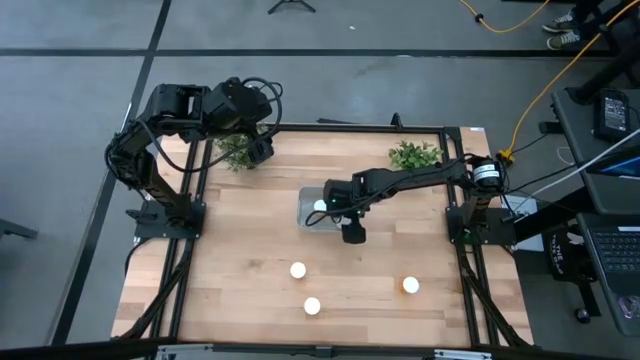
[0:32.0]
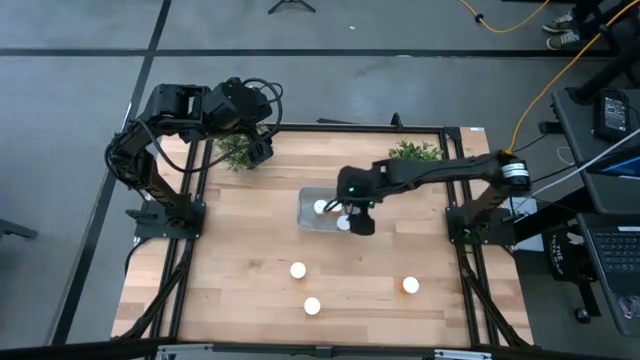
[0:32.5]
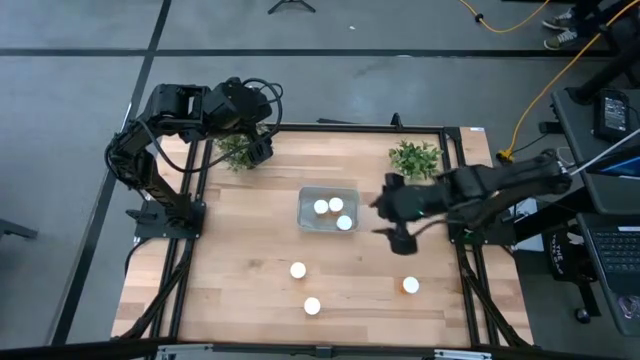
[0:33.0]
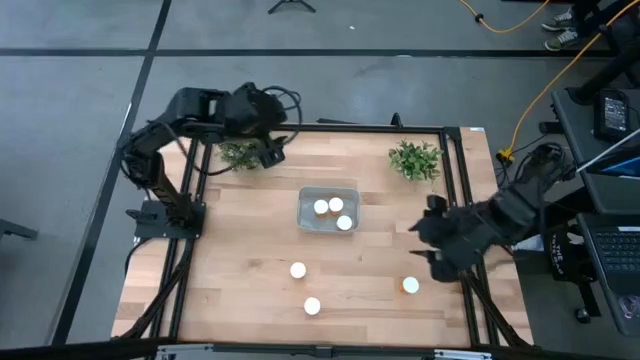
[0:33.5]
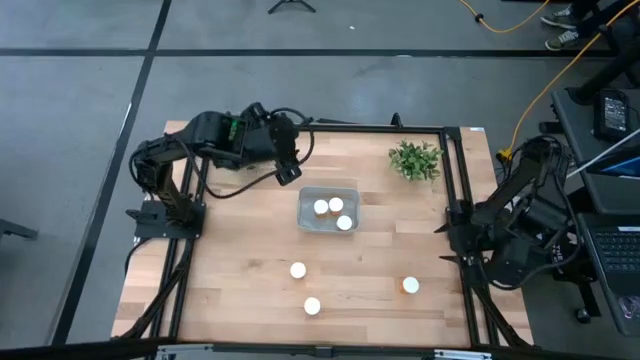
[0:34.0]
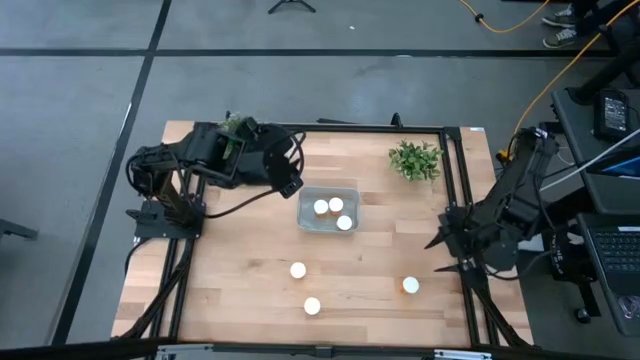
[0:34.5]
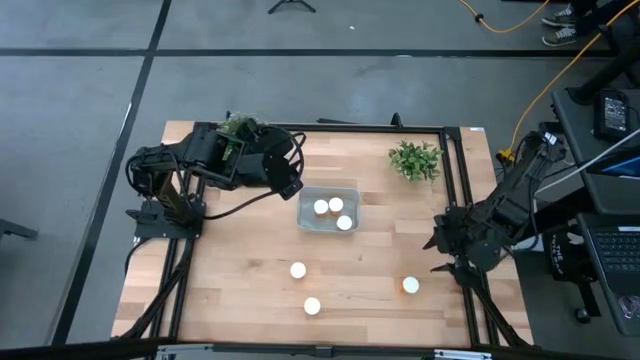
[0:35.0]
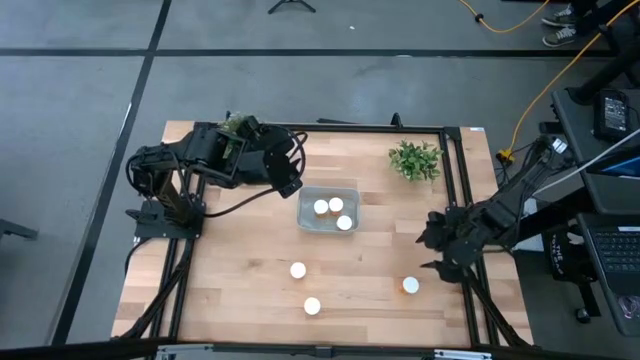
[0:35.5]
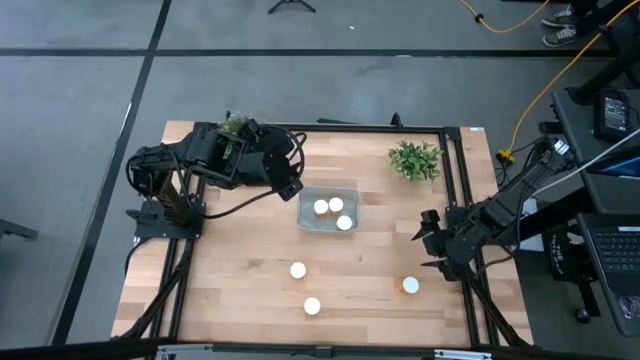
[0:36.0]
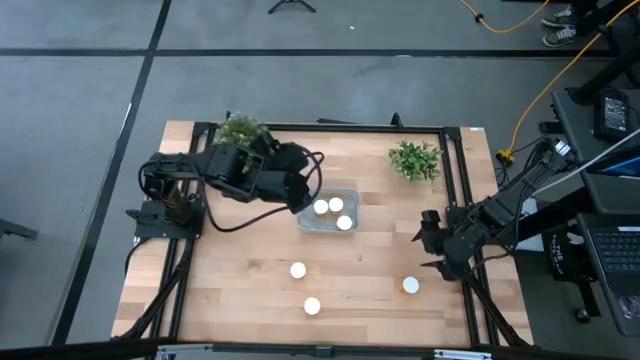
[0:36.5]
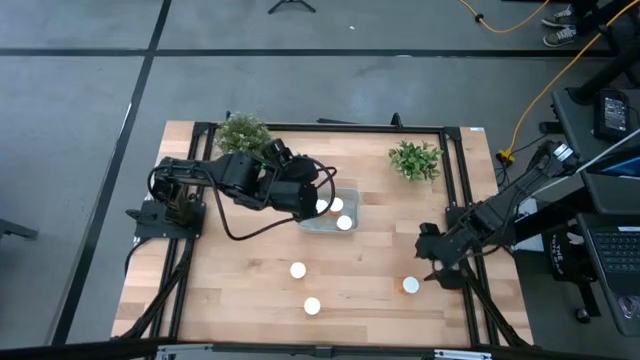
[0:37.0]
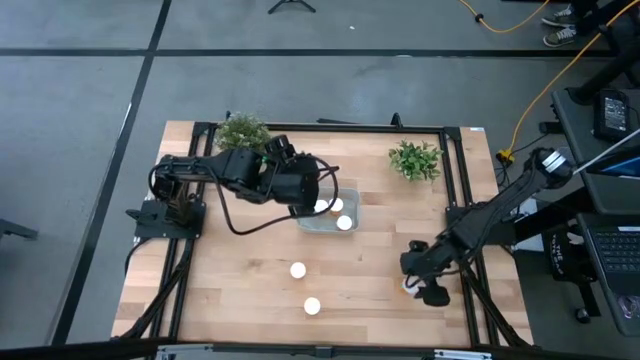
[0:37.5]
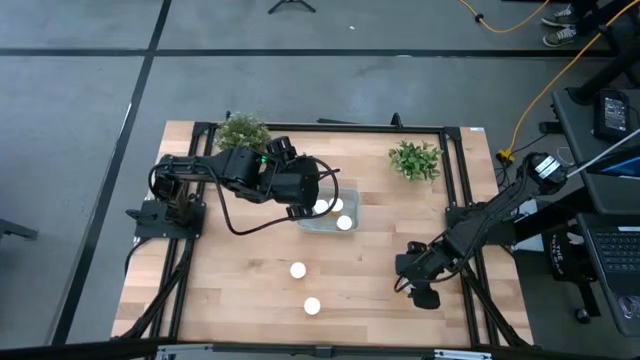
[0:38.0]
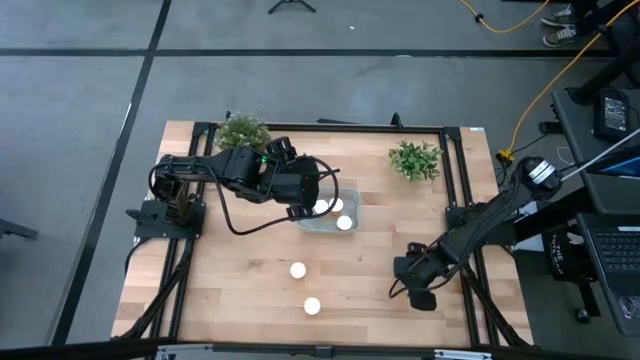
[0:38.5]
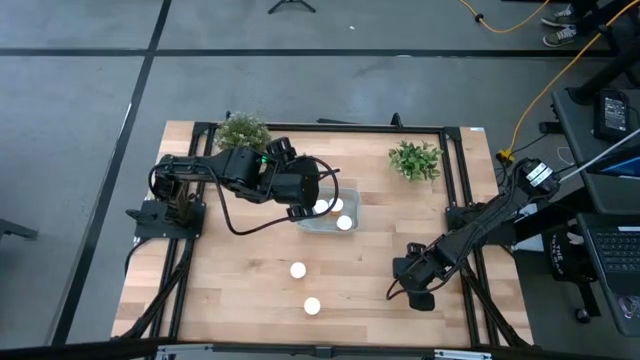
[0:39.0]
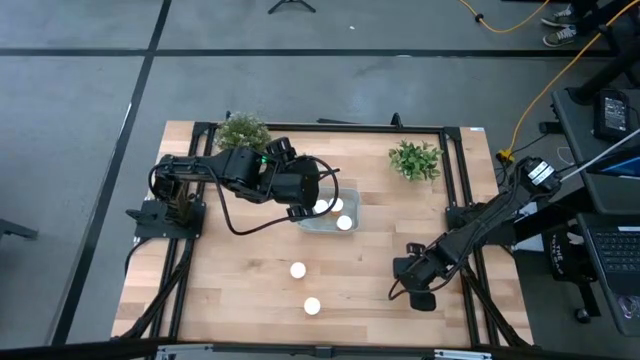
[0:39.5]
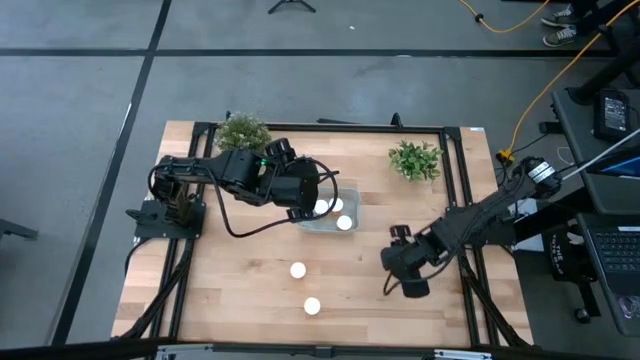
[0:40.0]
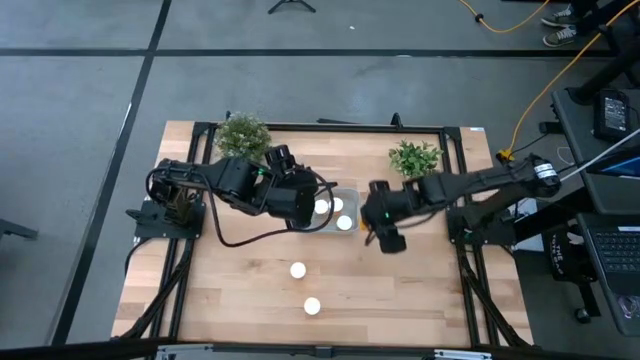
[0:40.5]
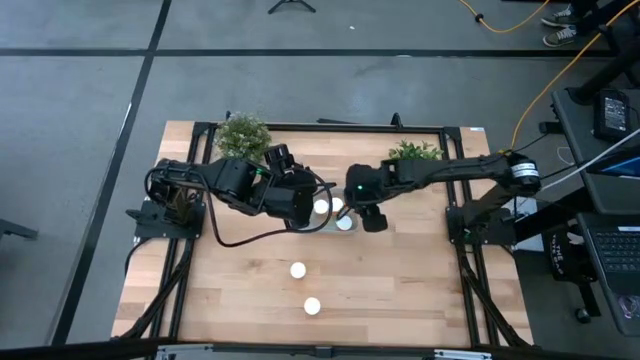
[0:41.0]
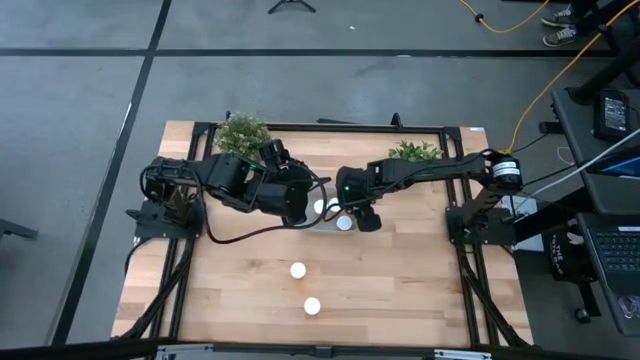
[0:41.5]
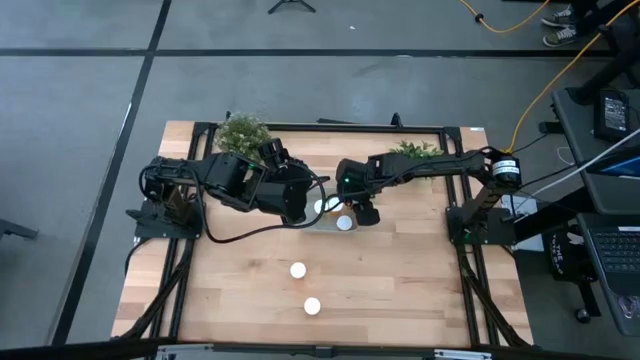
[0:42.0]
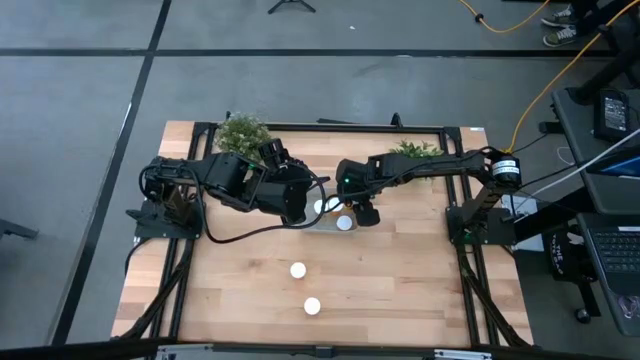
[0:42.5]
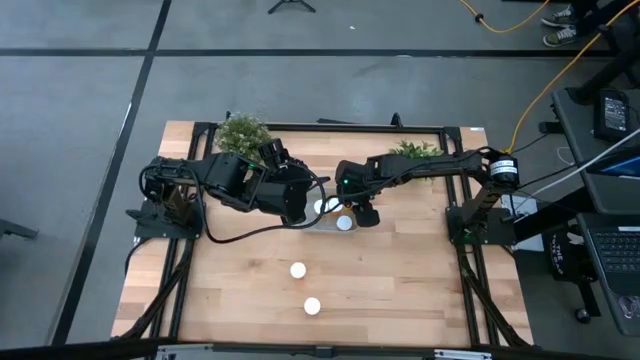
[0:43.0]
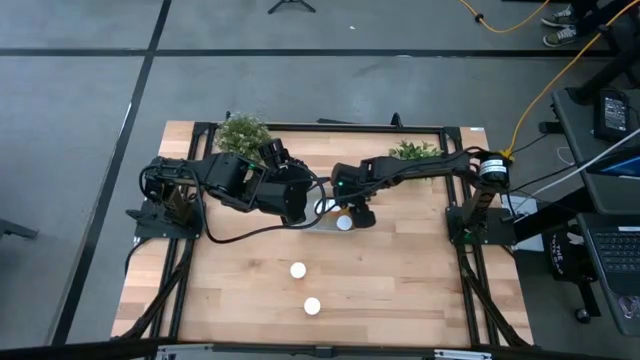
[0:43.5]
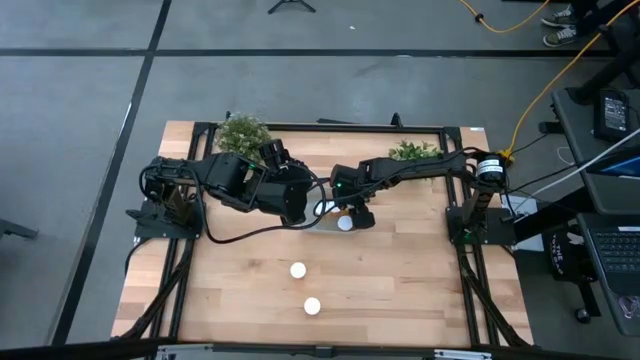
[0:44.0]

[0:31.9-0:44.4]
Task: Pick and place pill bottles into a basket
Put the middle right orange pill bottle into the gray bin

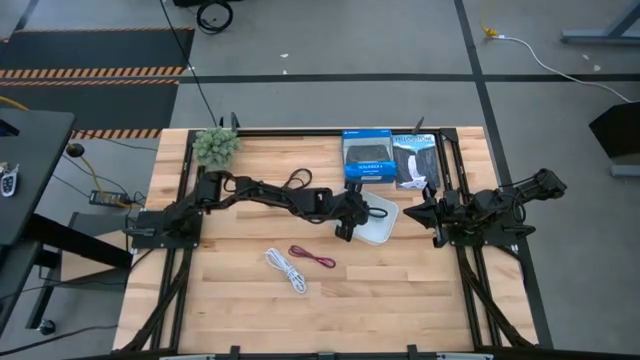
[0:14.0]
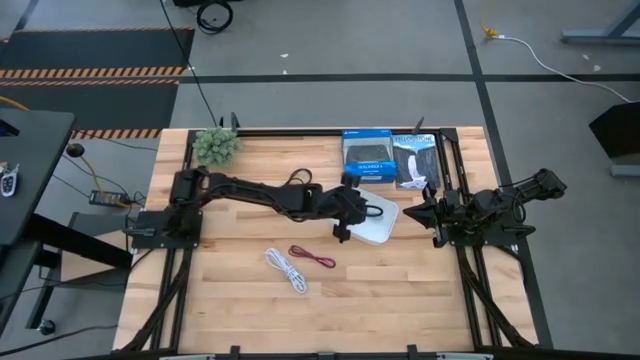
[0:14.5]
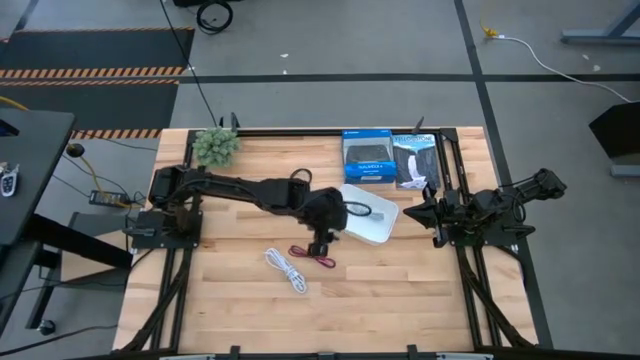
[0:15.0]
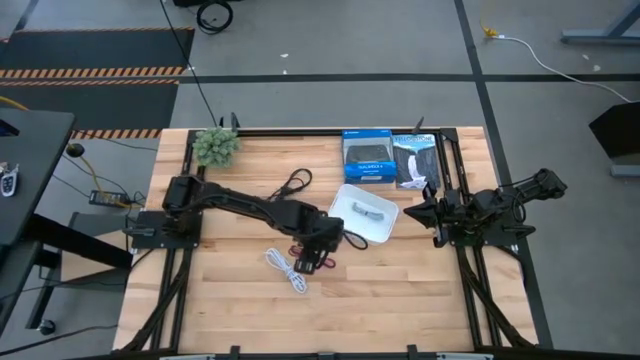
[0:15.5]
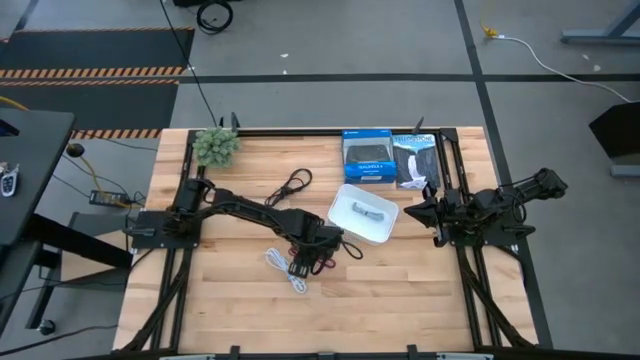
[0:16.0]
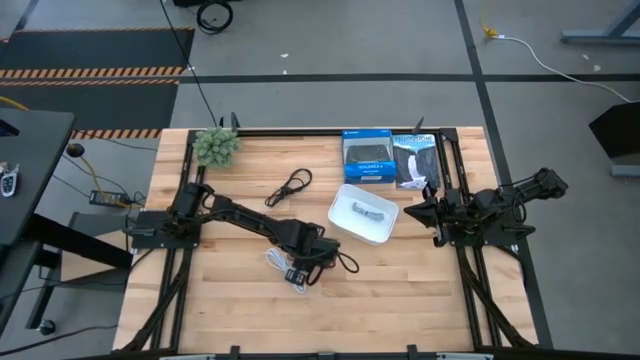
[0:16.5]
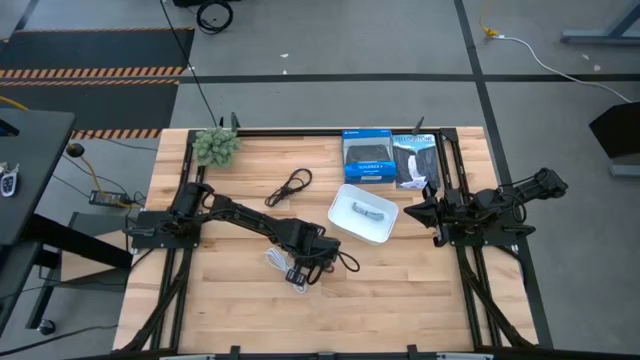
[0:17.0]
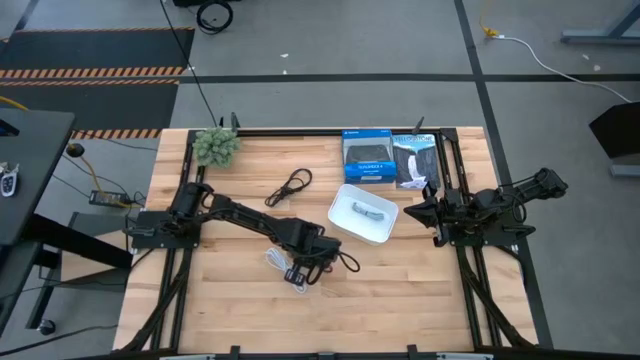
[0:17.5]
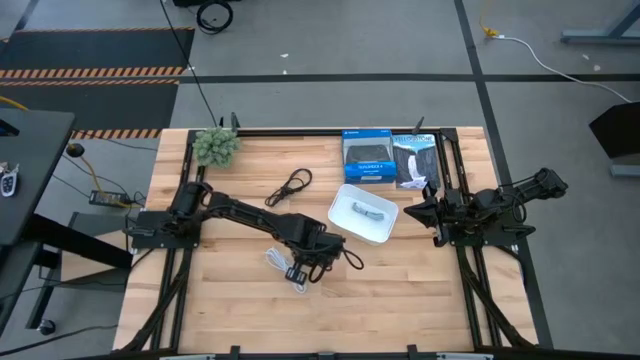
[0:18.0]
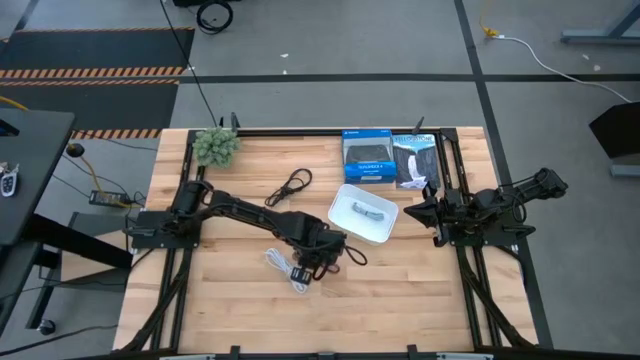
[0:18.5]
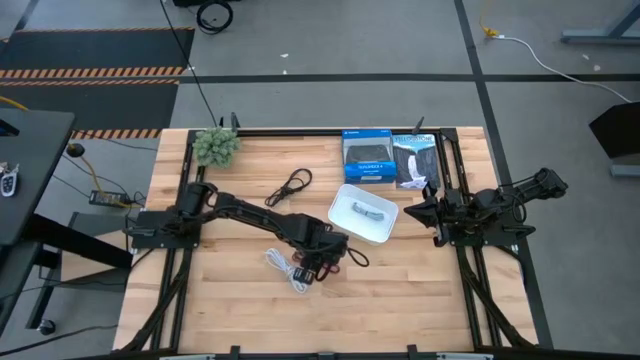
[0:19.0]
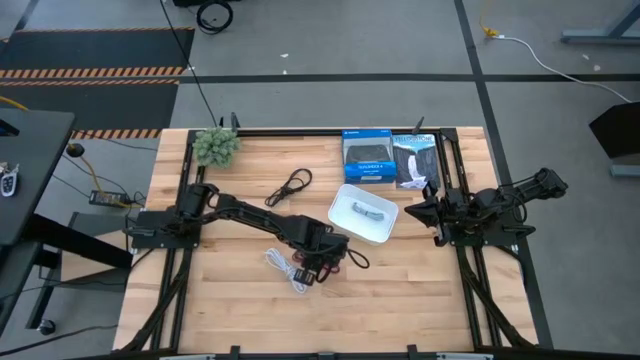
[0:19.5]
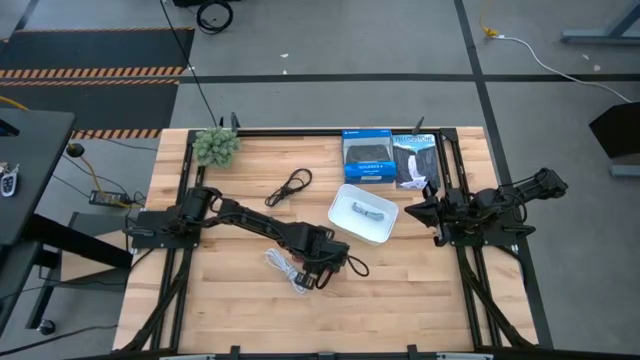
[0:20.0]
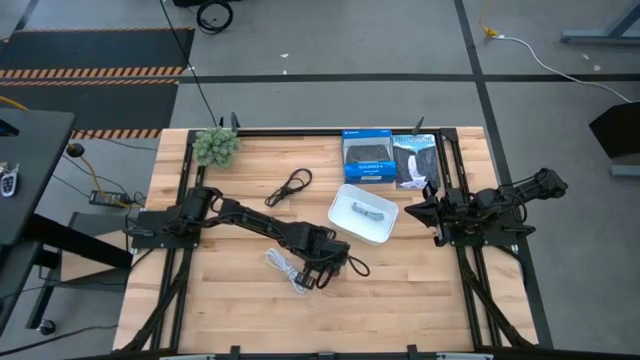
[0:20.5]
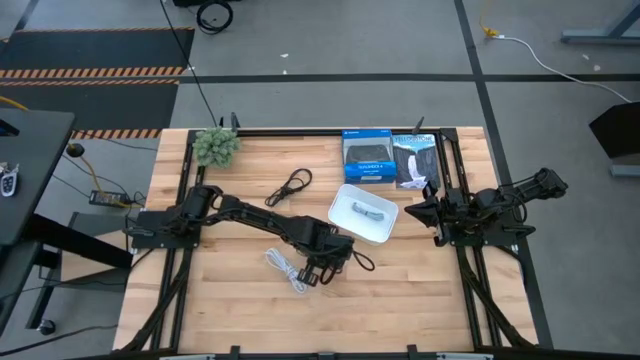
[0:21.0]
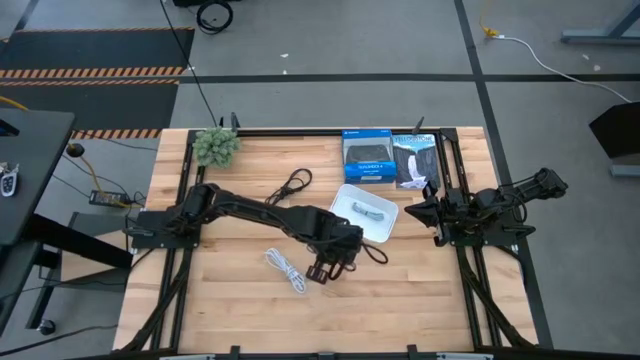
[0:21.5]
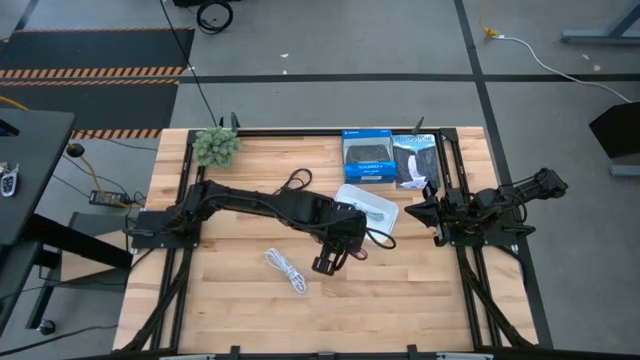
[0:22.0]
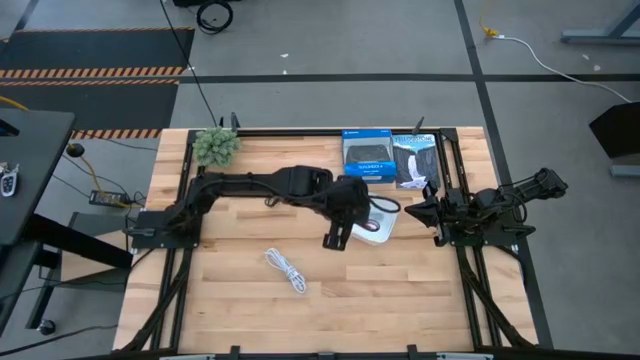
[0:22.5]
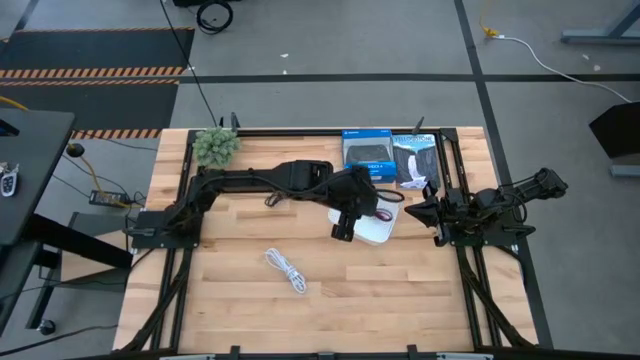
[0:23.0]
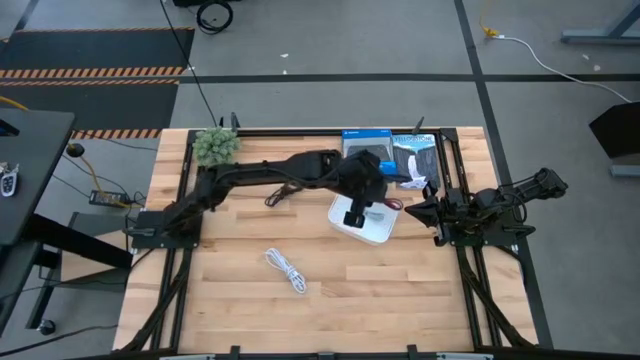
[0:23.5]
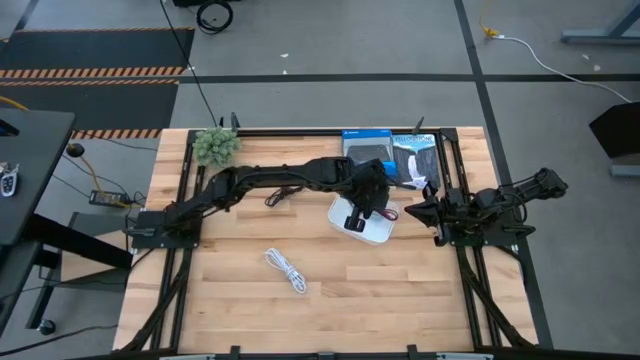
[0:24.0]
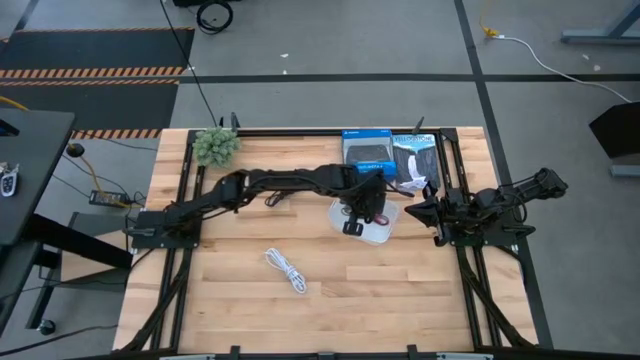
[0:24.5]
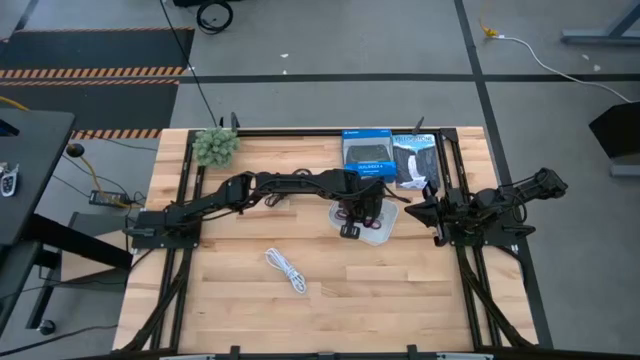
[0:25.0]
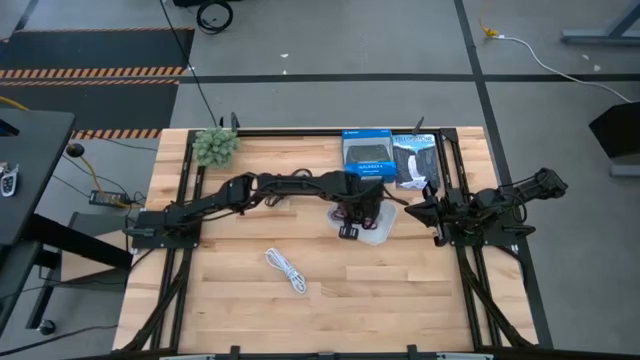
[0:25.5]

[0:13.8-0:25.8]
Task: Pick and place USB-C Cables
Put the red charger cable into the white bin
